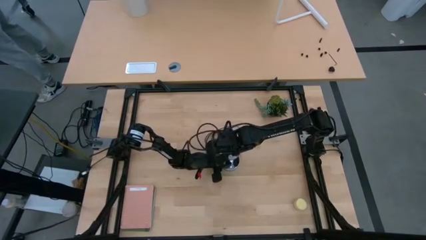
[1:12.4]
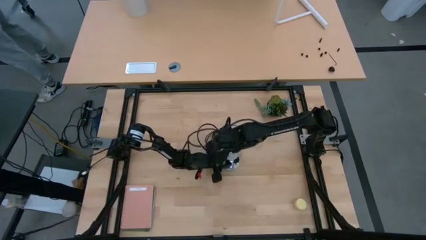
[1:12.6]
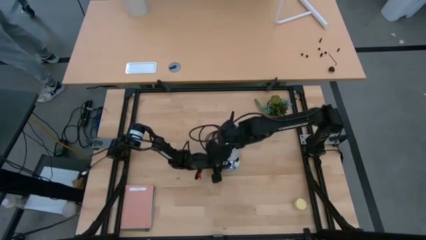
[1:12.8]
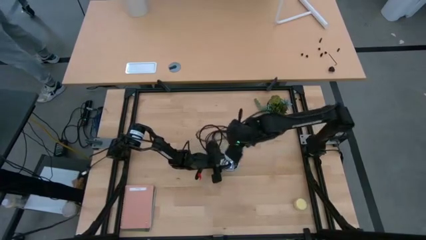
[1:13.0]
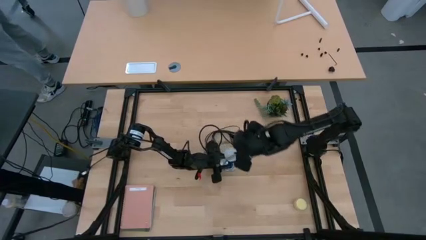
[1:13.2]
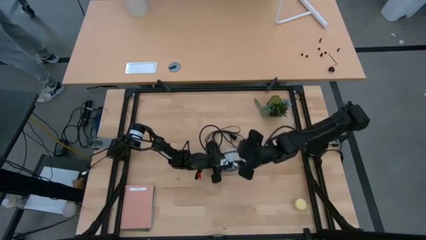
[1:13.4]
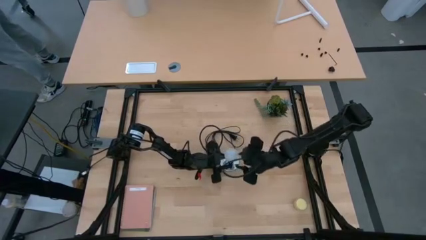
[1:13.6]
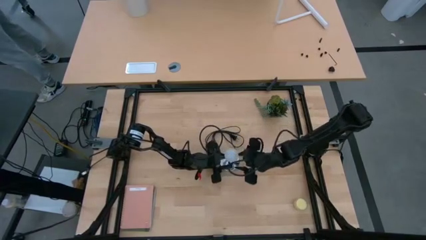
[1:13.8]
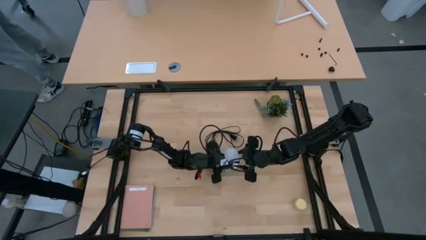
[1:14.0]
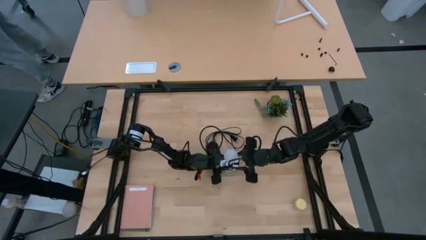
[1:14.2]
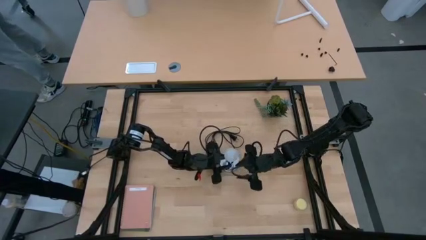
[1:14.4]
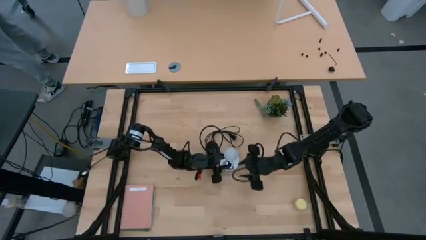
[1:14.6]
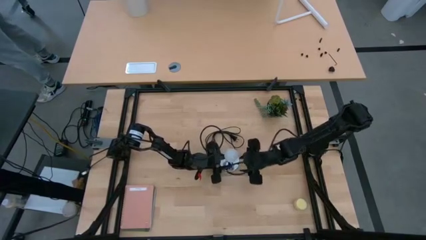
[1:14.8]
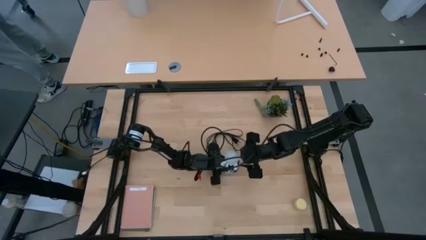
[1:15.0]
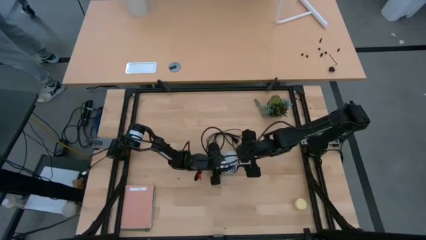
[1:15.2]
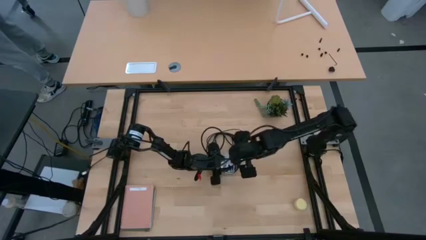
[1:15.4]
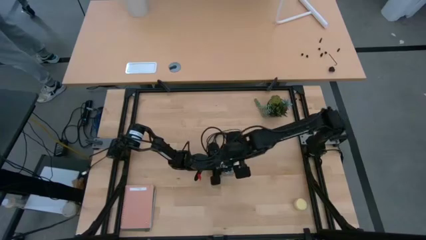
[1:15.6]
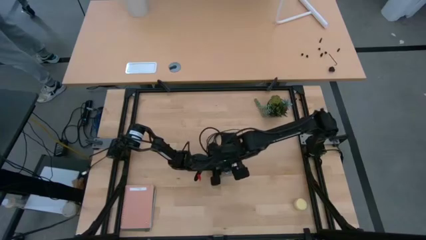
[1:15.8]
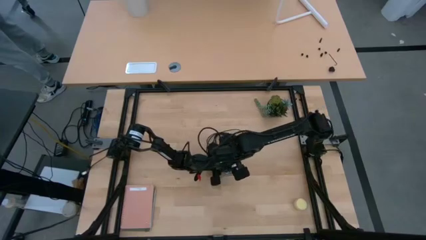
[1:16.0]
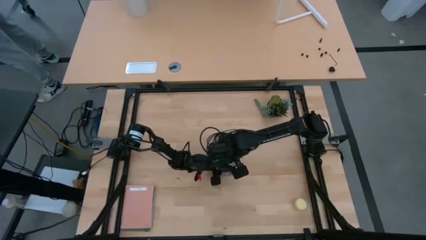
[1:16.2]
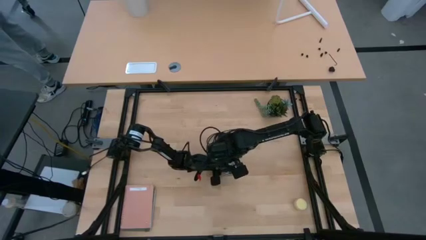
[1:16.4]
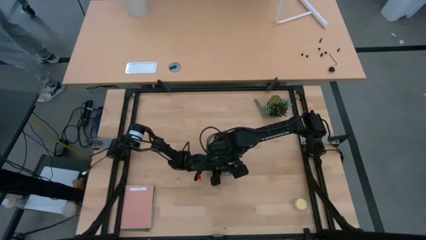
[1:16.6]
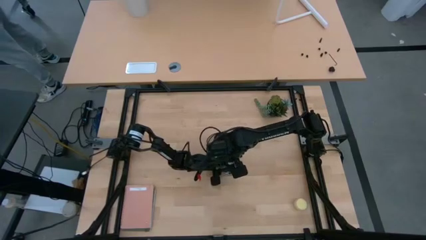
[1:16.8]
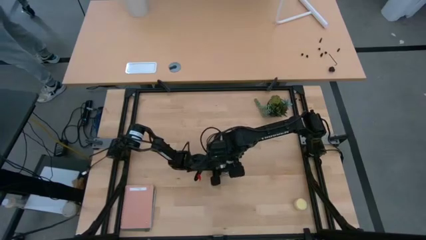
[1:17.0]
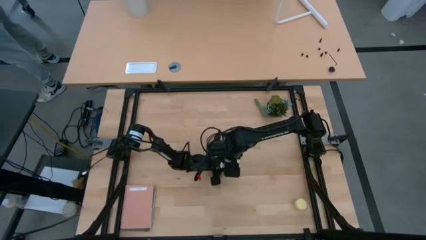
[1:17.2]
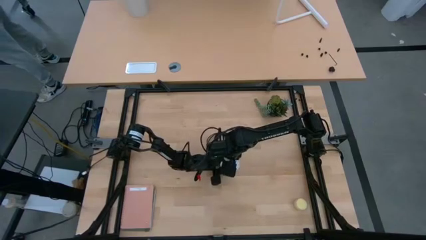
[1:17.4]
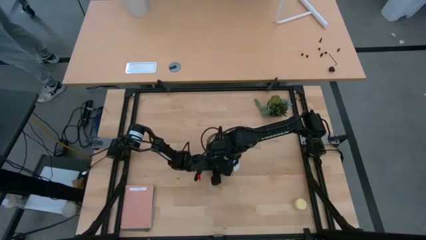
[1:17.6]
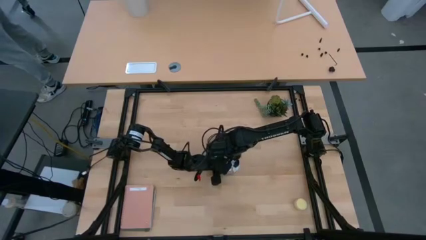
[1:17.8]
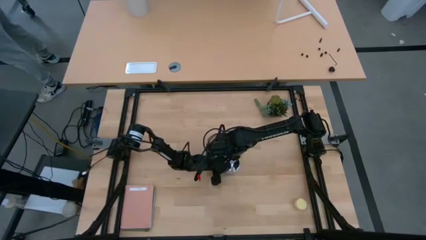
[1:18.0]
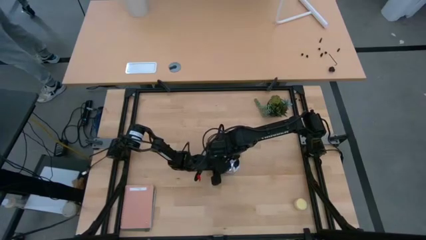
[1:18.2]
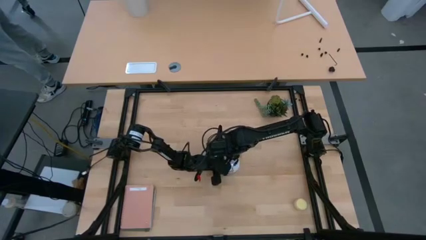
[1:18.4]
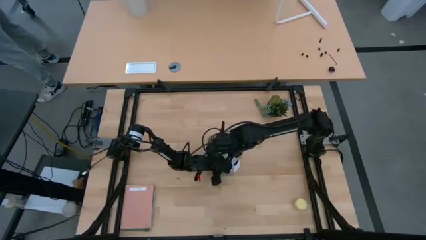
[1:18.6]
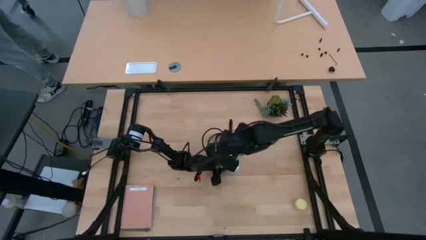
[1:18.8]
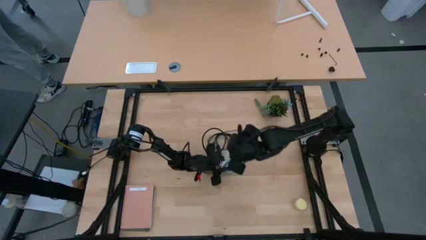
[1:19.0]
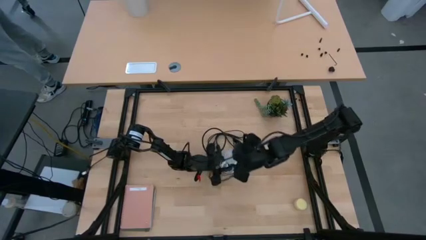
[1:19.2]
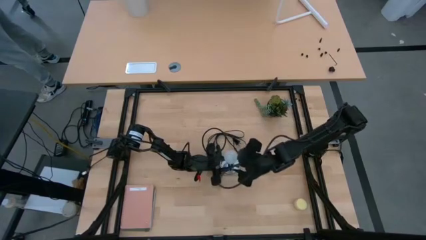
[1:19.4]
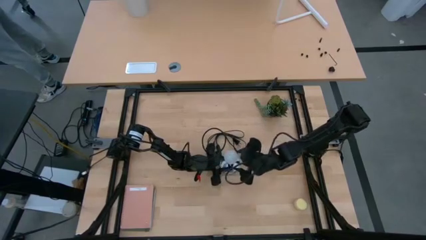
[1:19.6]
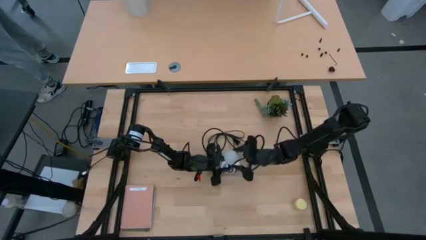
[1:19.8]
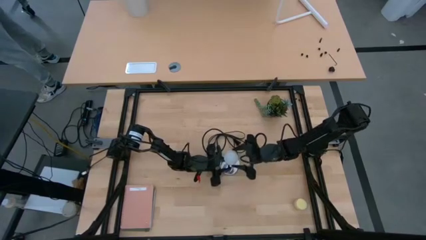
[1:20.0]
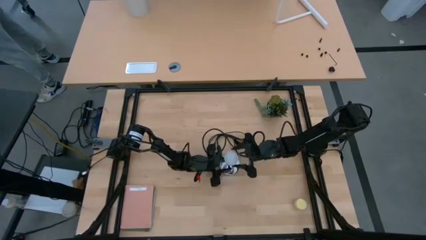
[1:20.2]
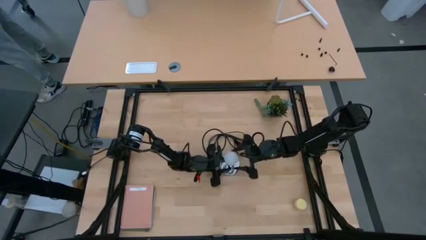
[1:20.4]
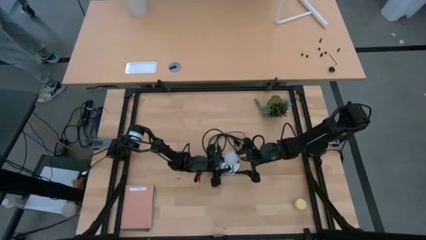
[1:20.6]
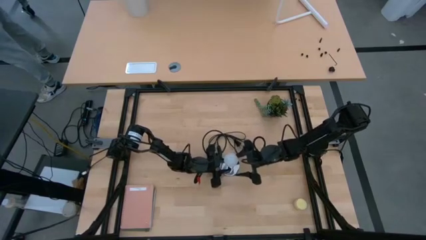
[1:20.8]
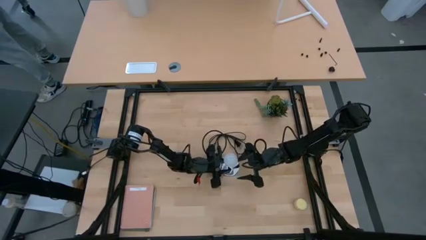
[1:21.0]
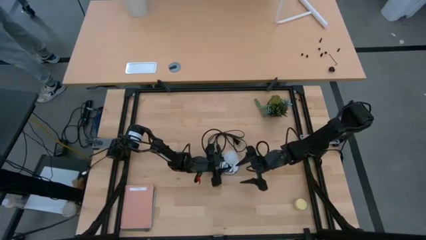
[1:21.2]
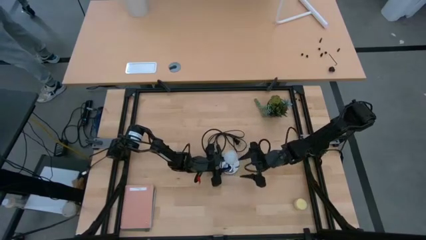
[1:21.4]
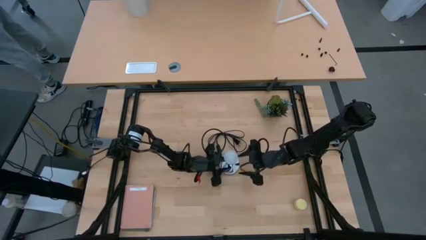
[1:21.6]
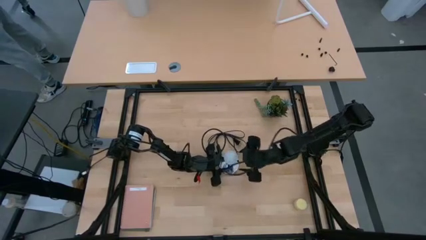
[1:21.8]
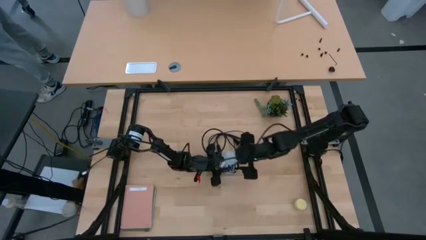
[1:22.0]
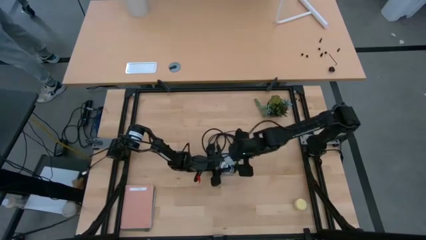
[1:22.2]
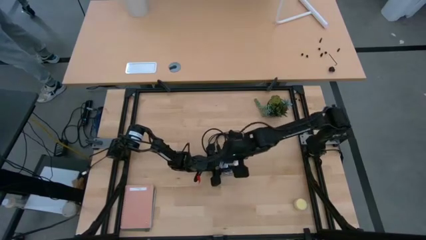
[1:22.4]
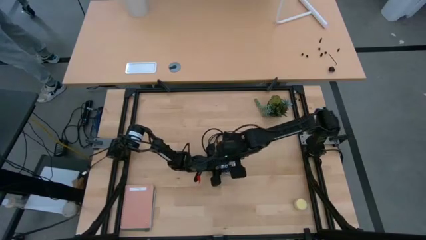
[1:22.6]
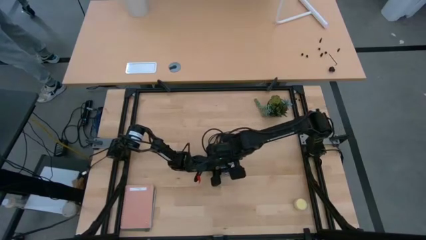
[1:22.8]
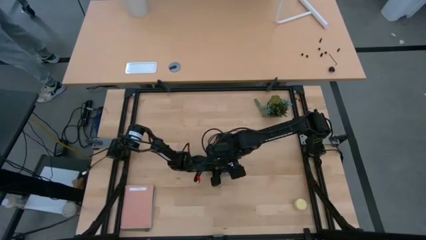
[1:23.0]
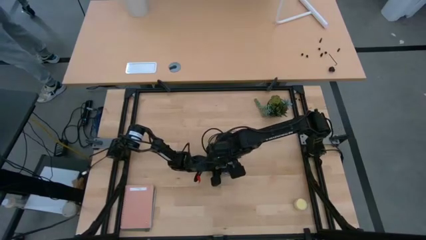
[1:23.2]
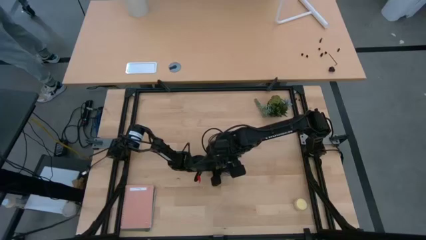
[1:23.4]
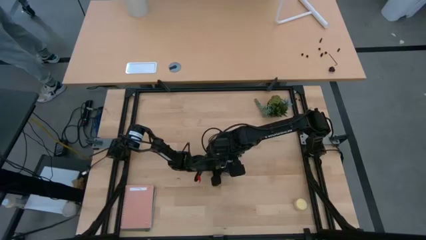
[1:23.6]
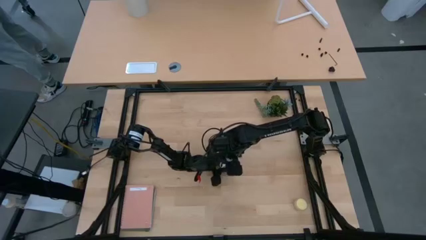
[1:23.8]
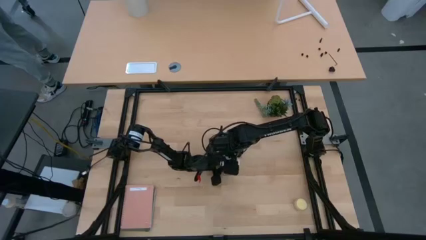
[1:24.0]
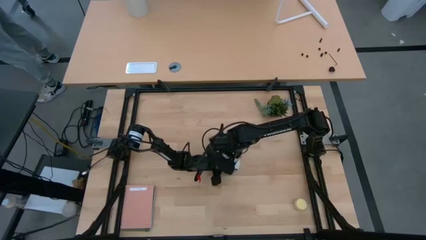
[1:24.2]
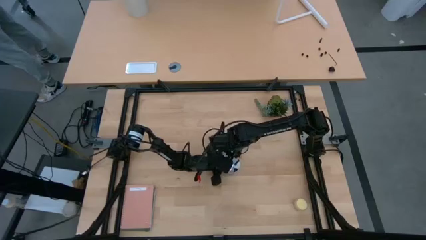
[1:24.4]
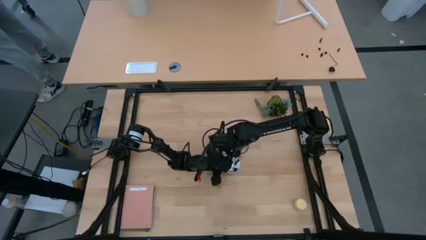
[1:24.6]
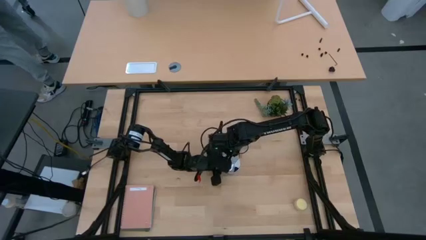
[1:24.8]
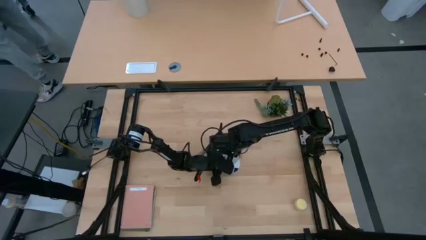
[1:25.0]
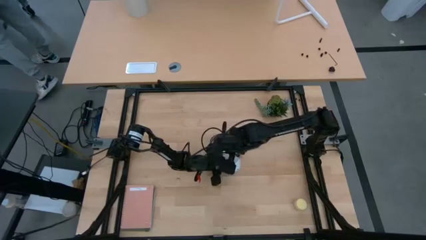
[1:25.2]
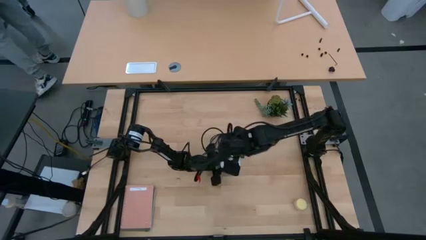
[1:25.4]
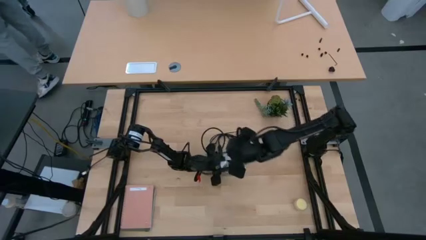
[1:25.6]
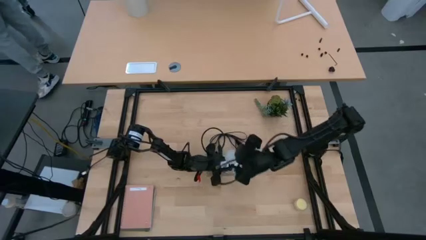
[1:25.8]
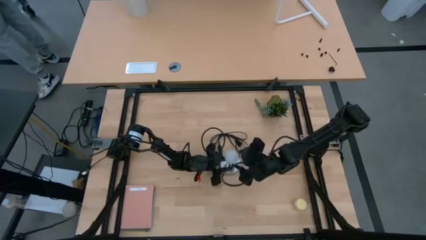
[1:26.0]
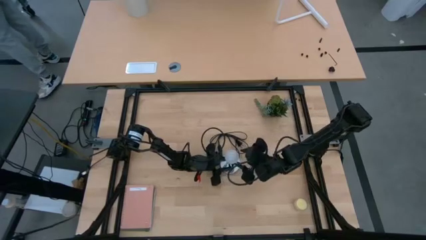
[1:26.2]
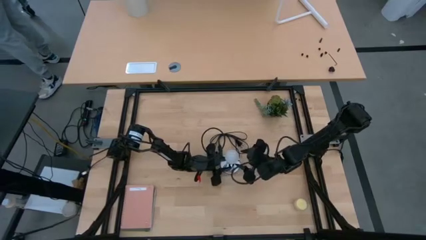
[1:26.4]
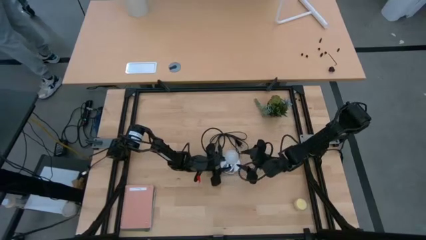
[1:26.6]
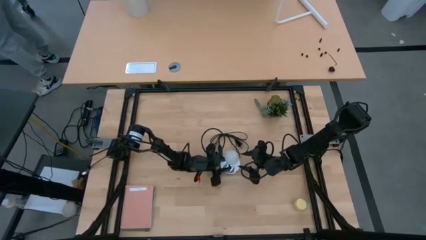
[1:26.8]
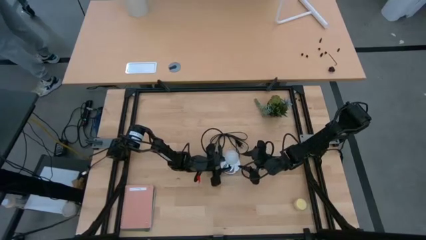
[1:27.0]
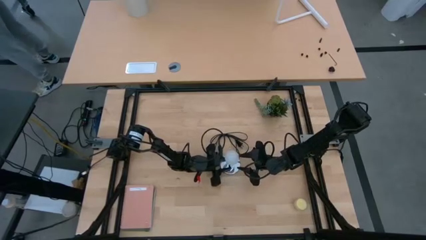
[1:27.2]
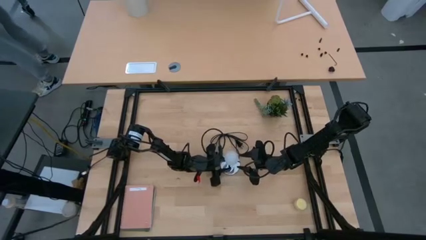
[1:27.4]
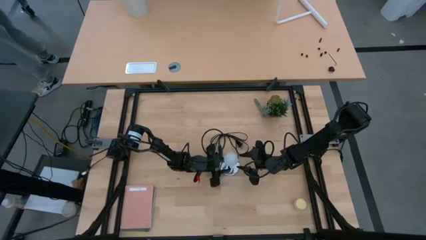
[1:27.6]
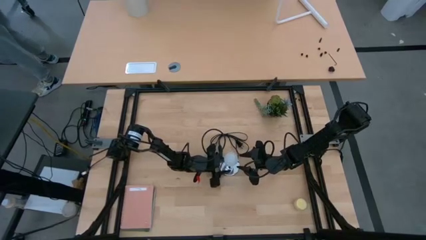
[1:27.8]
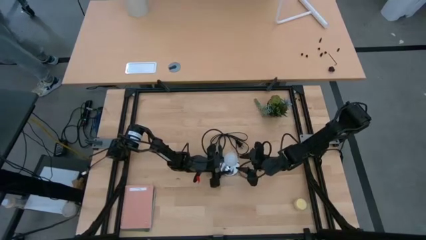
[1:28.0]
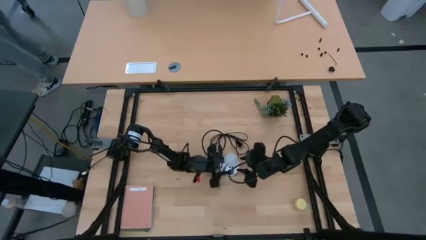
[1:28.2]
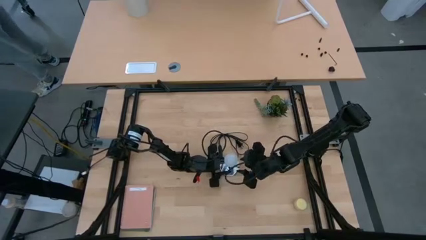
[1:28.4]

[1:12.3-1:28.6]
Task: Screw lightbulb
Insert the lightbulb into the lamp
